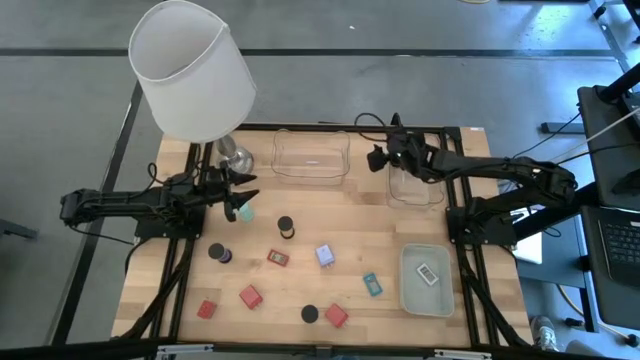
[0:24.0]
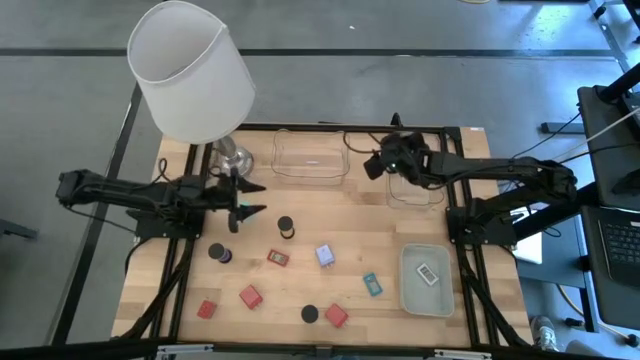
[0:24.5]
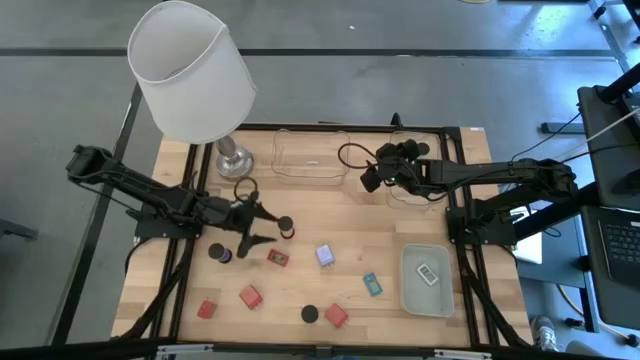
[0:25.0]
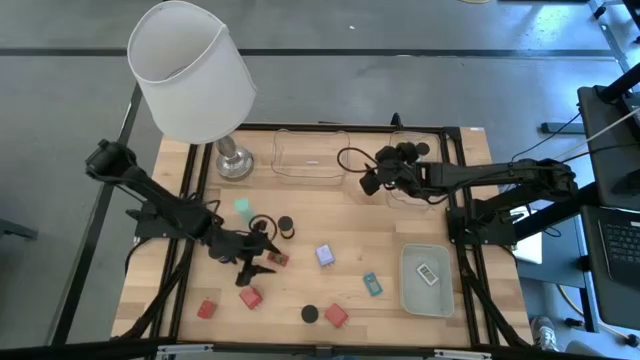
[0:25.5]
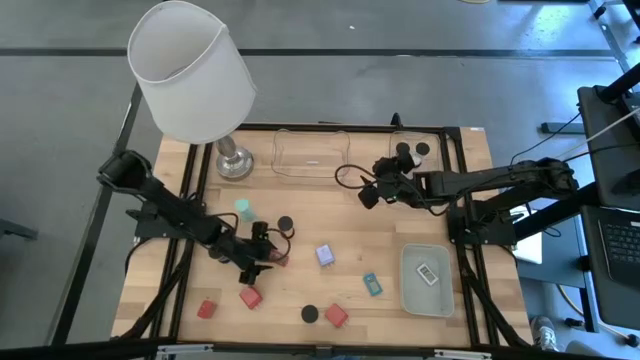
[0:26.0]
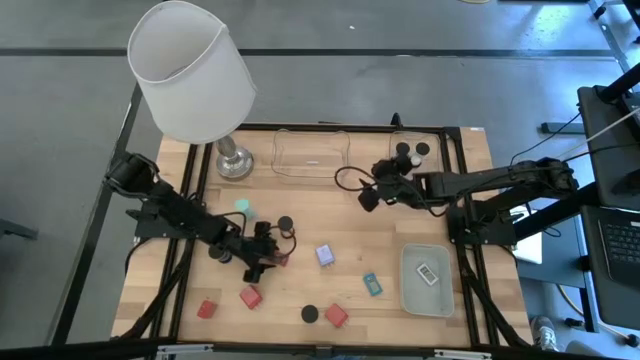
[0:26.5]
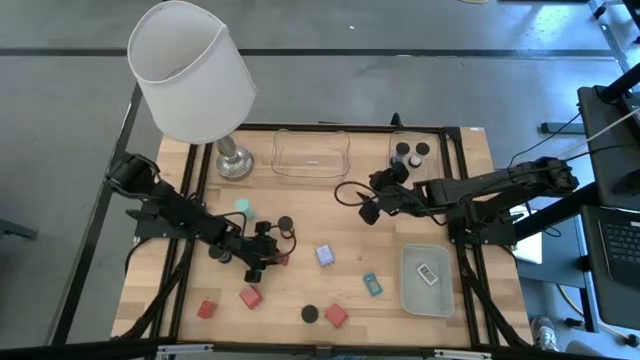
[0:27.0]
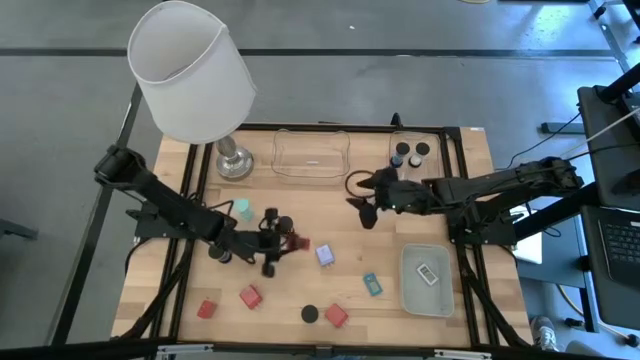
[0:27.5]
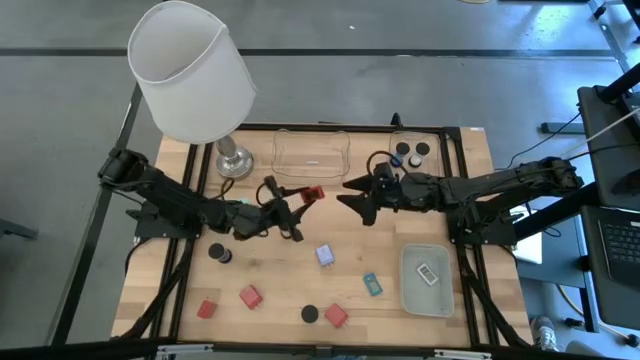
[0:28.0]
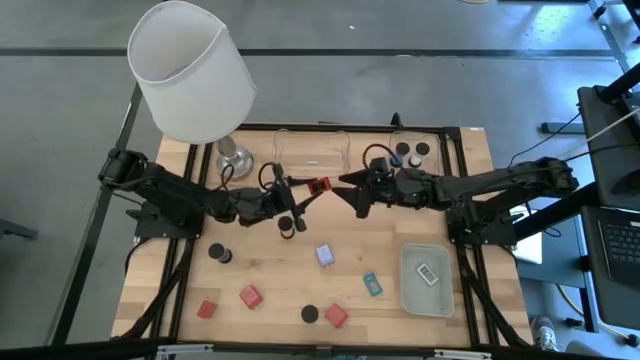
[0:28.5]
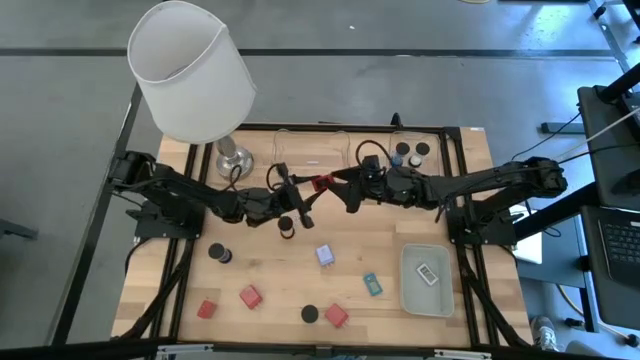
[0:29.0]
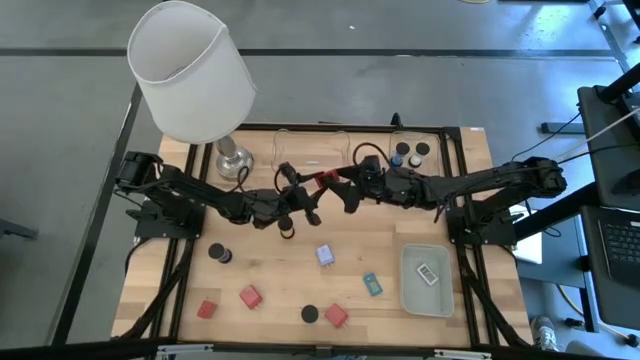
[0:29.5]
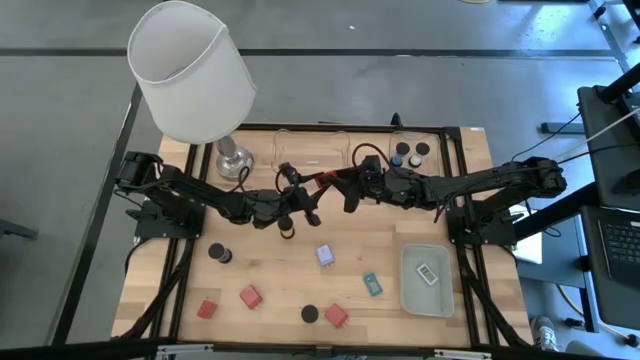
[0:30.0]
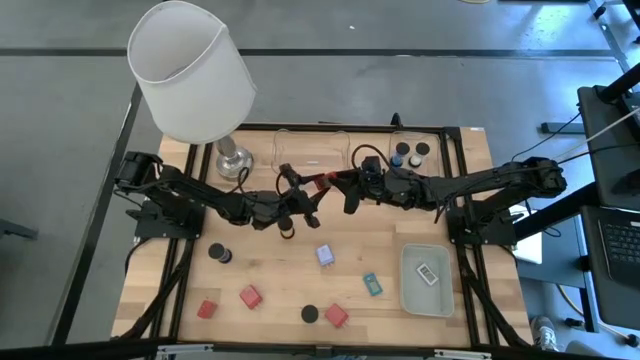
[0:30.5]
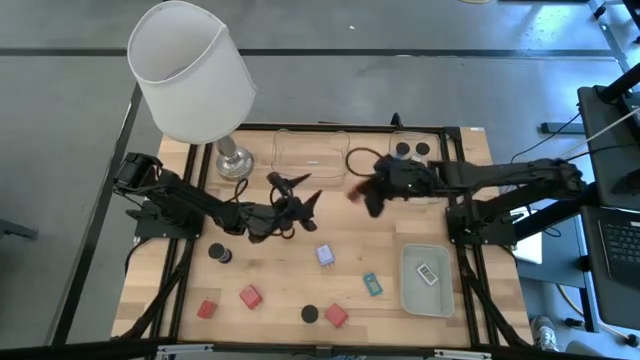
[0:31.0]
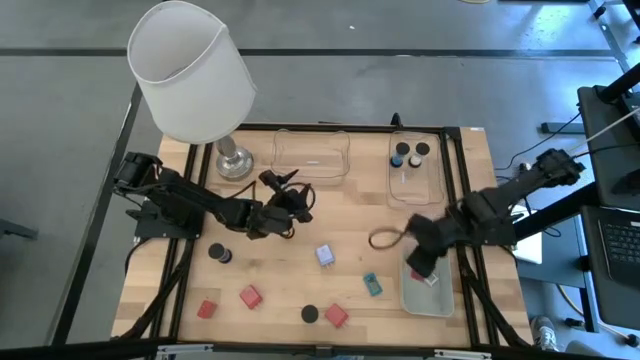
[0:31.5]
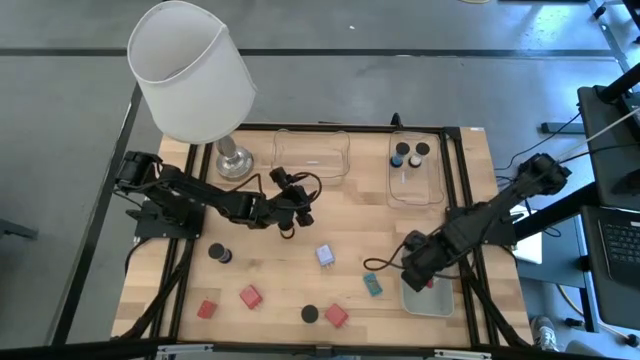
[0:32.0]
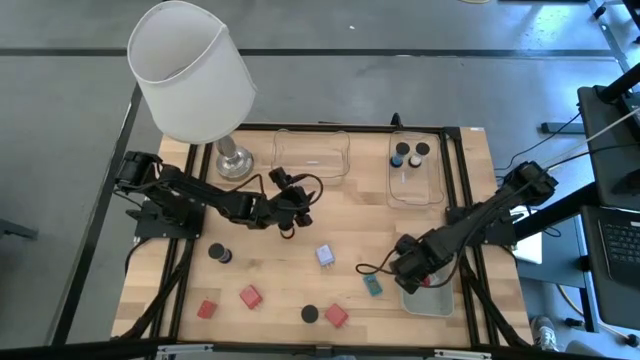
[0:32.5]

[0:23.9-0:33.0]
Task: Pick & Place Office items
Put the red digital clock into the gray bin

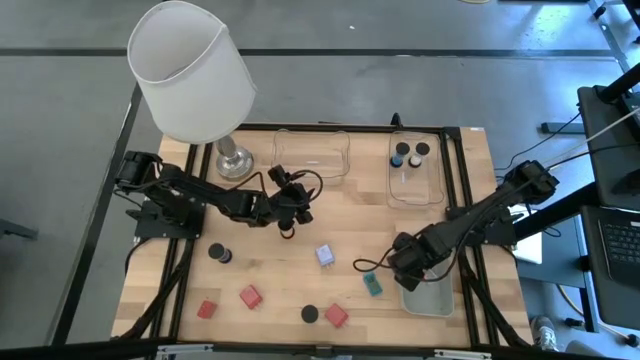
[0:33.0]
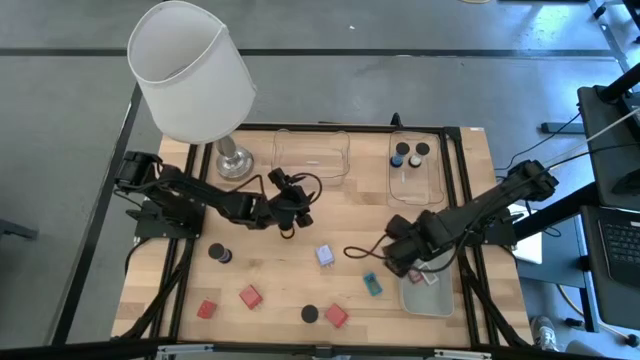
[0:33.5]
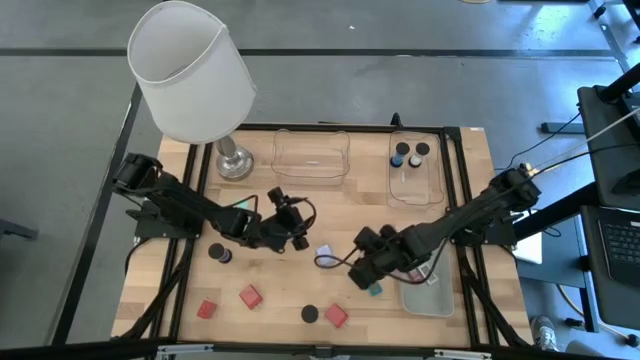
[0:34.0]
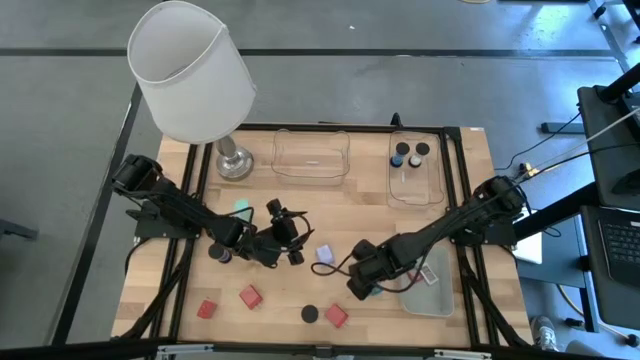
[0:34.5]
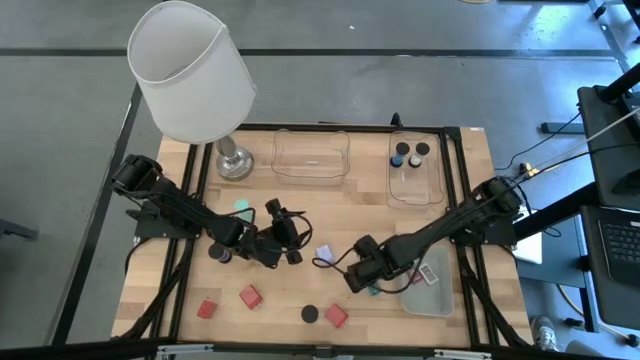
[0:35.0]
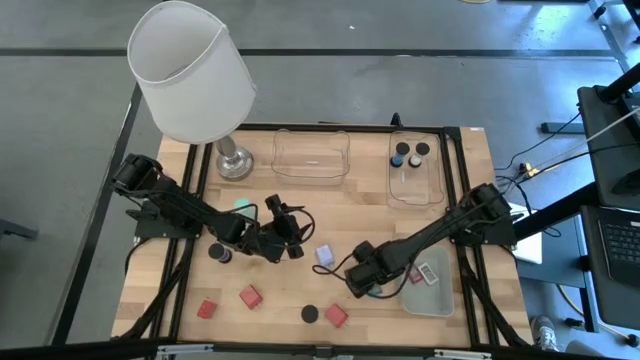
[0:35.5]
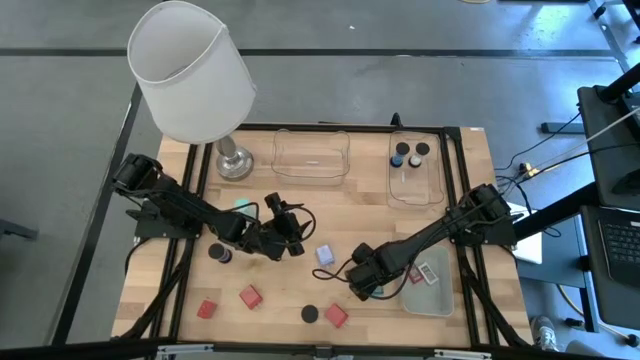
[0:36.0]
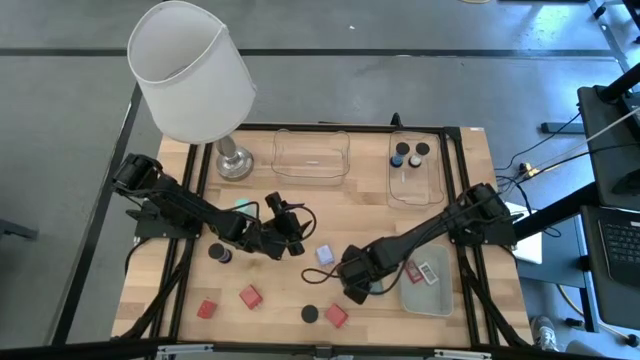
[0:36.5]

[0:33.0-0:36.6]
Put the blue digital clock into the gray bin

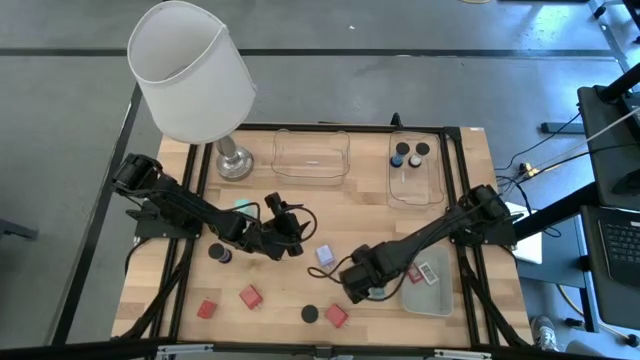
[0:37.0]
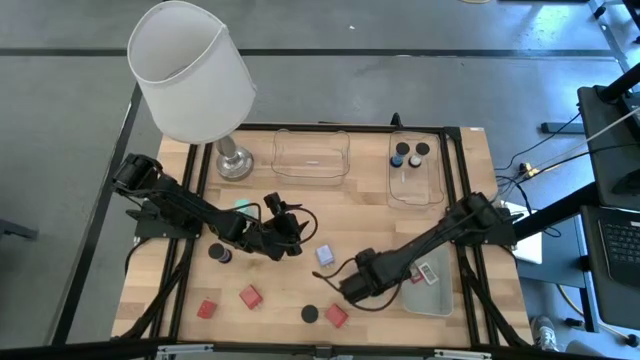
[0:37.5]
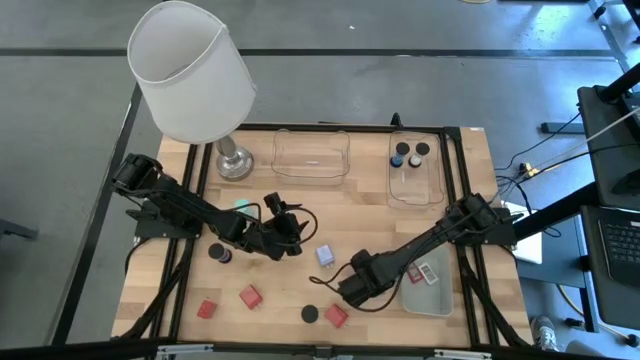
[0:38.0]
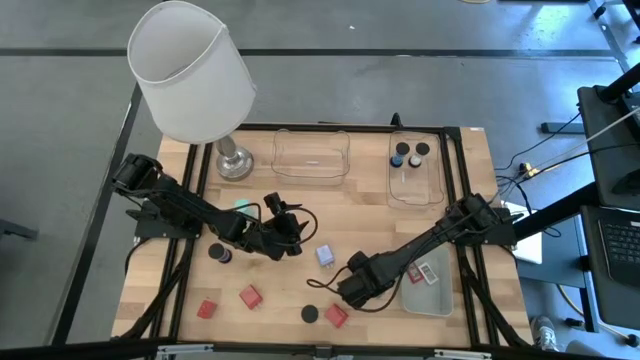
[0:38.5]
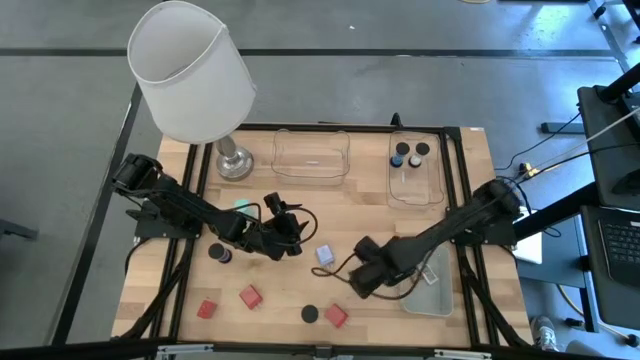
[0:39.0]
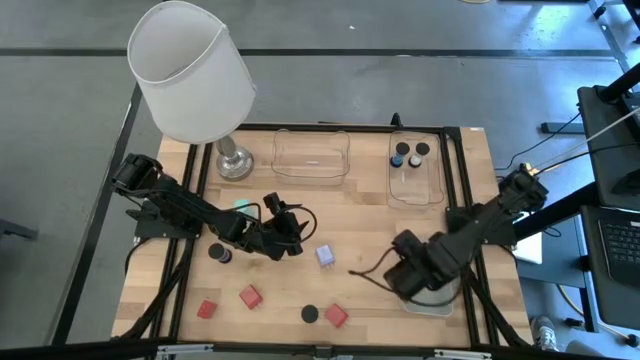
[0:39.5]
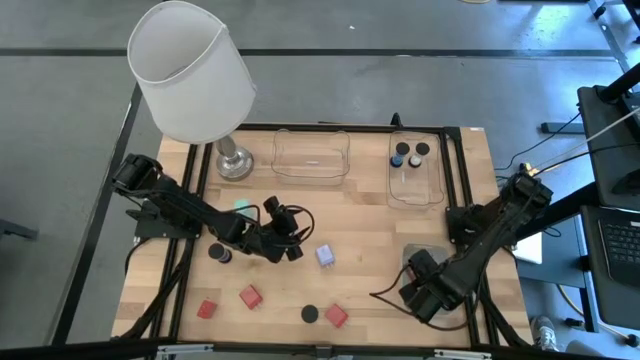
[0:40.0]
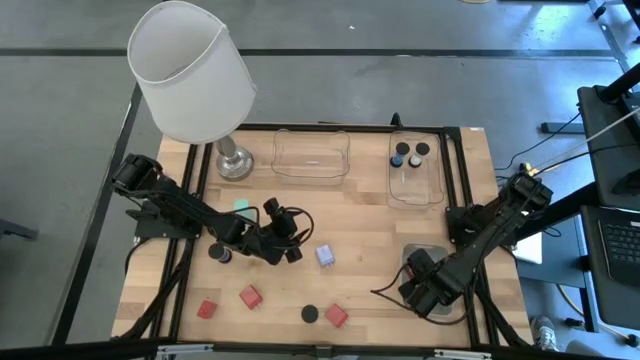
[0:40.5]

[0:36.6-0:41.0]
Put the blue digital clock into the gray bin

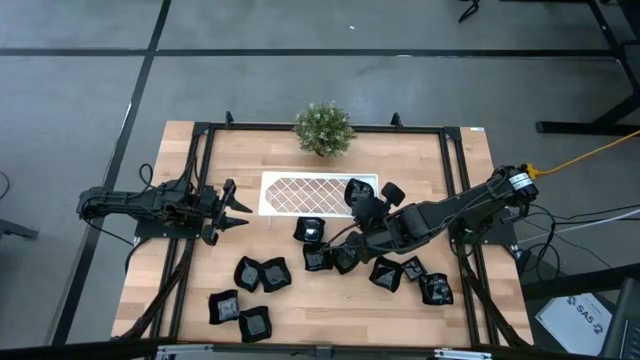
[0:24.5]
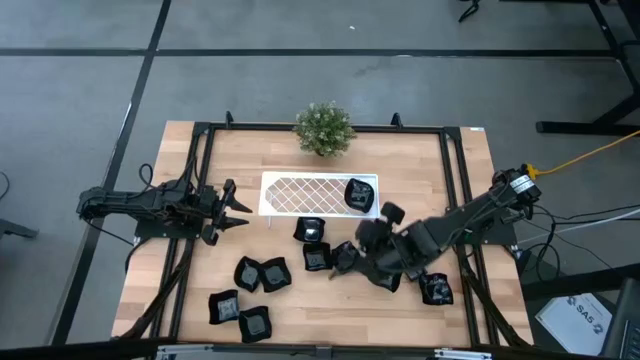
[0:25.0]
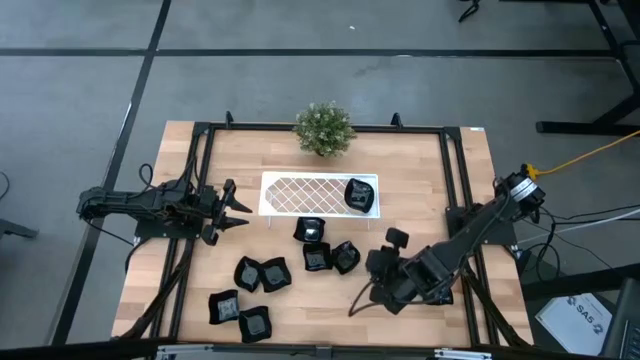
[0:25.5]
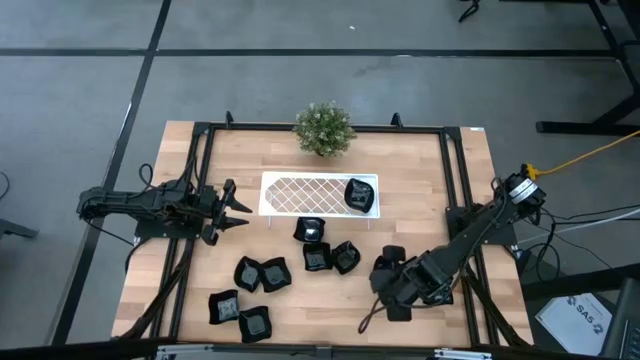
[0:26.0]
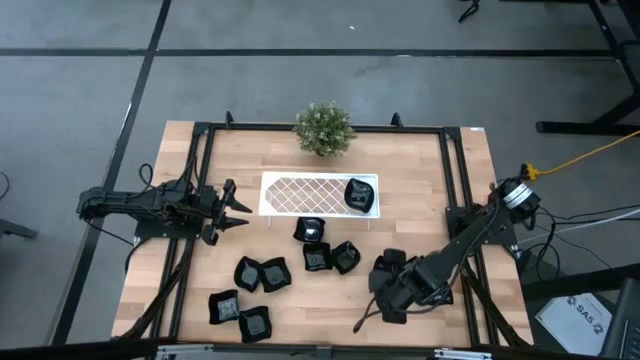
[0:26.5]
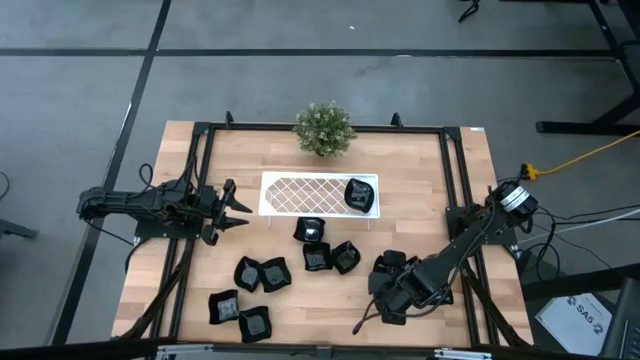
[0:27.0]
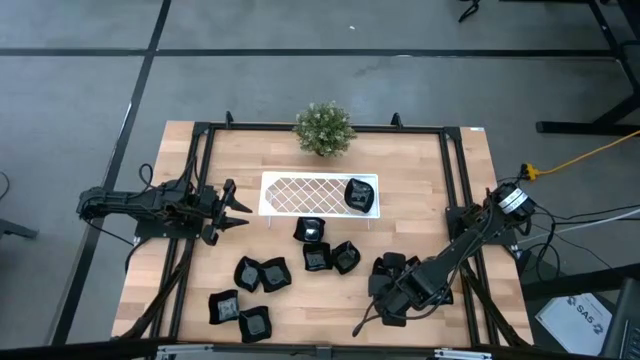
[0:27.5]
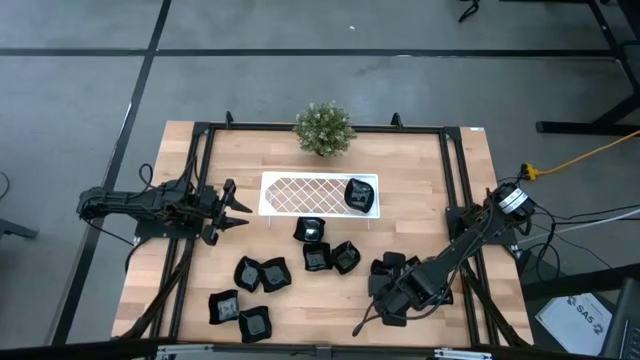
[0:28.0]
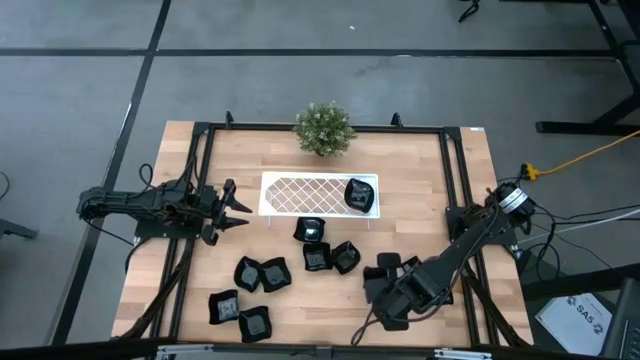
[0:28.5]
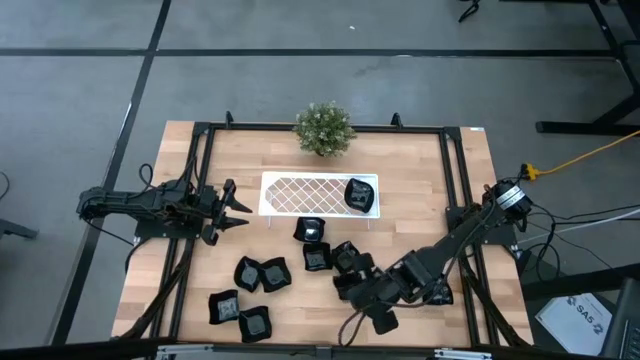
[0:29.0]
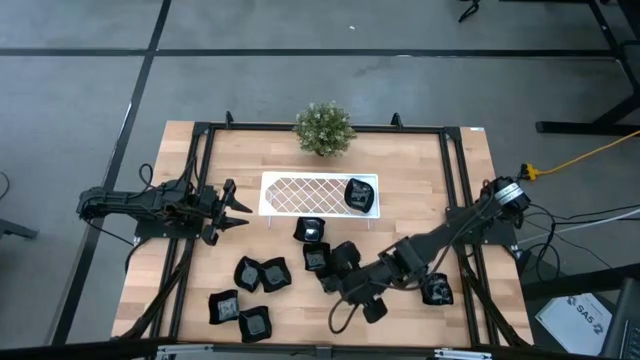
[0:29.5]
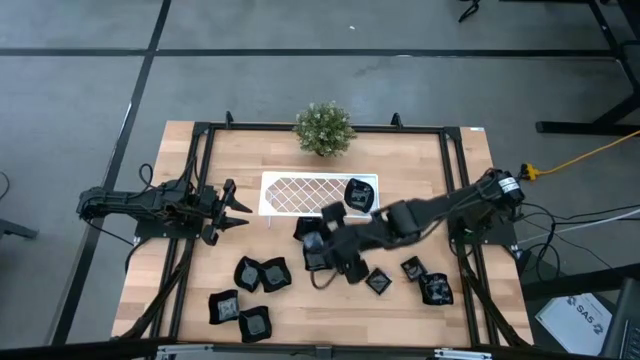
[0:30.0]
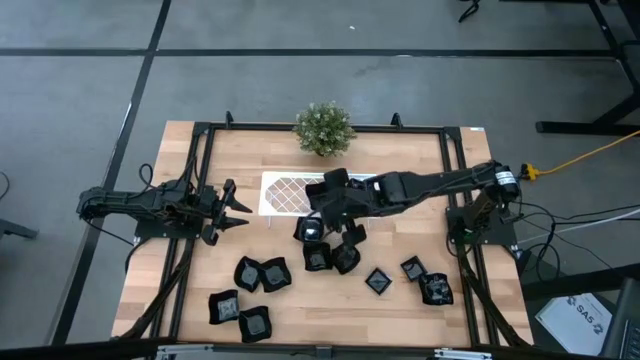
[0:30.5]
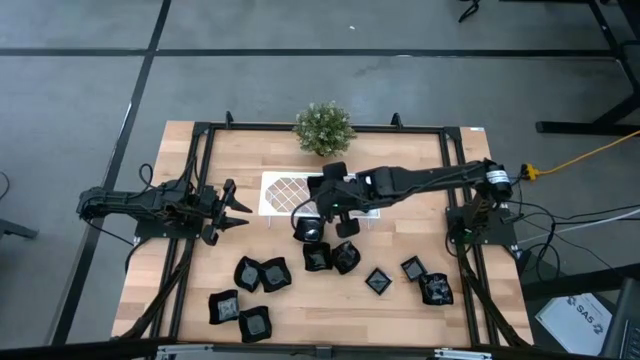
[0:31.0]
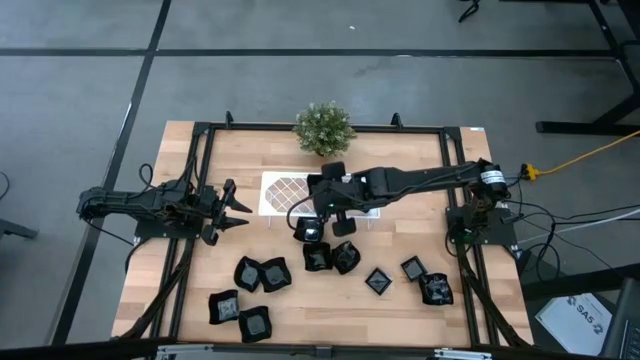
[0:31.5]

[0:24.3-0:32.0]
Task: Pick & Place Mini shaped plates
Put the black distorted square plate on the shelf
